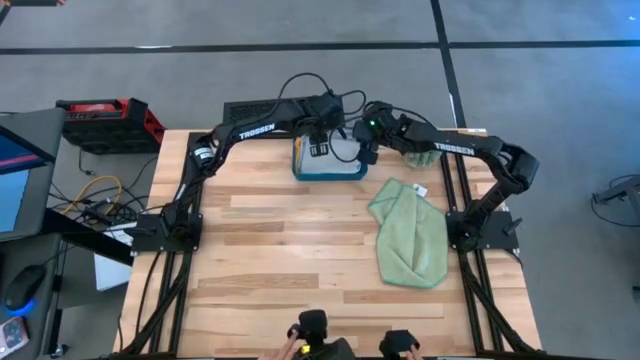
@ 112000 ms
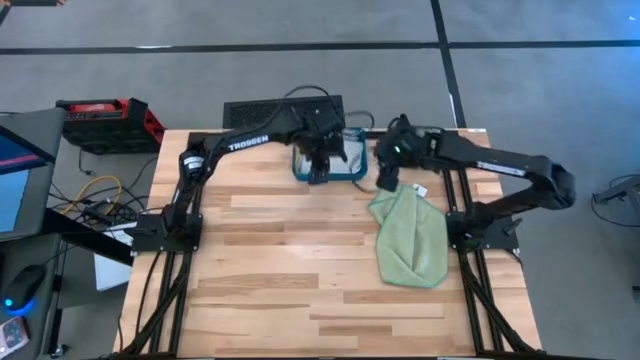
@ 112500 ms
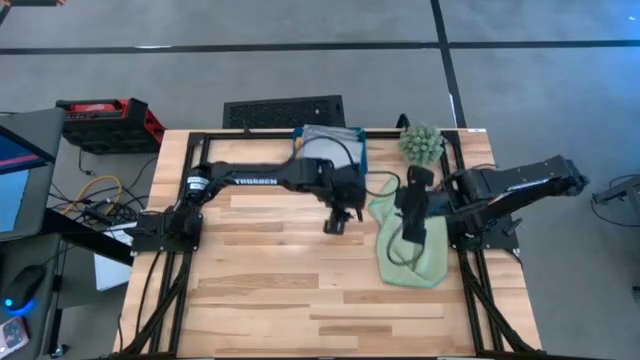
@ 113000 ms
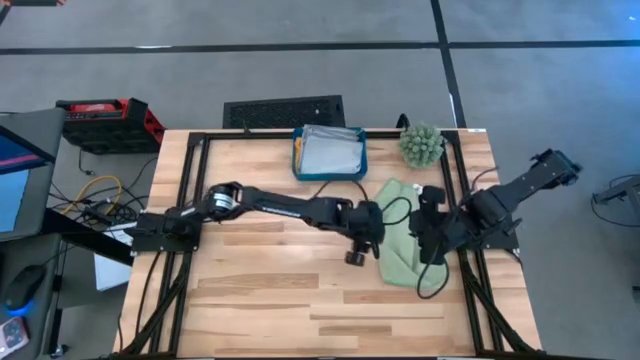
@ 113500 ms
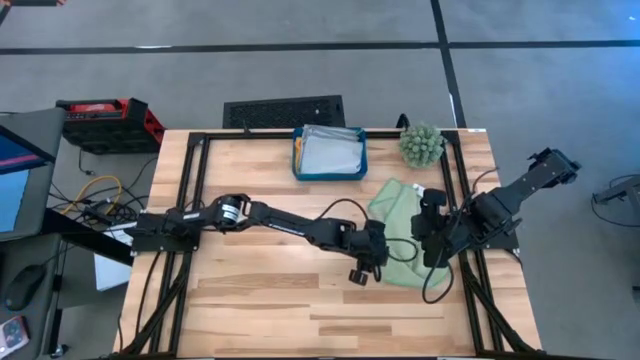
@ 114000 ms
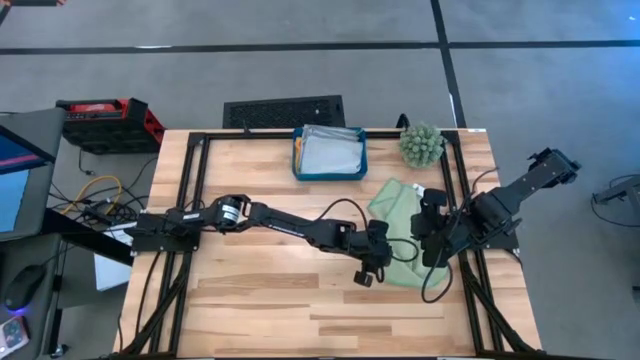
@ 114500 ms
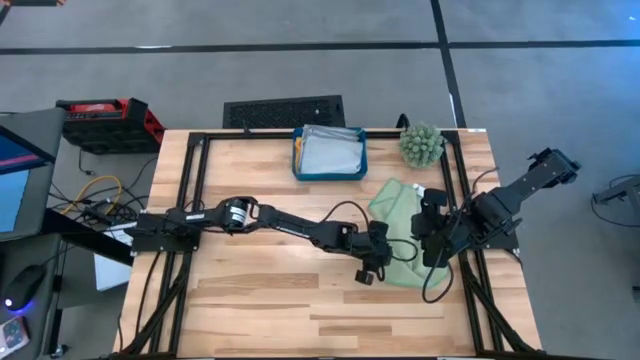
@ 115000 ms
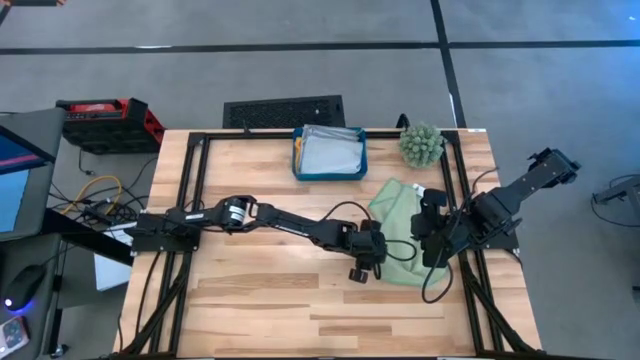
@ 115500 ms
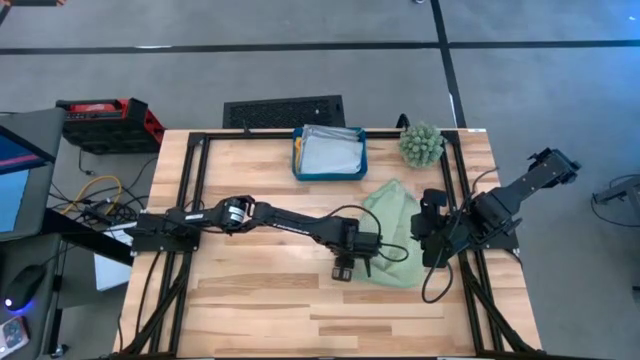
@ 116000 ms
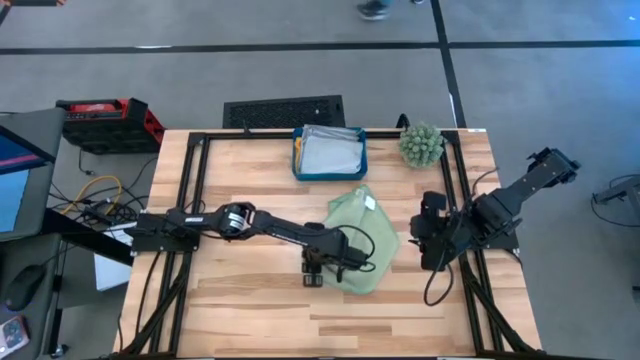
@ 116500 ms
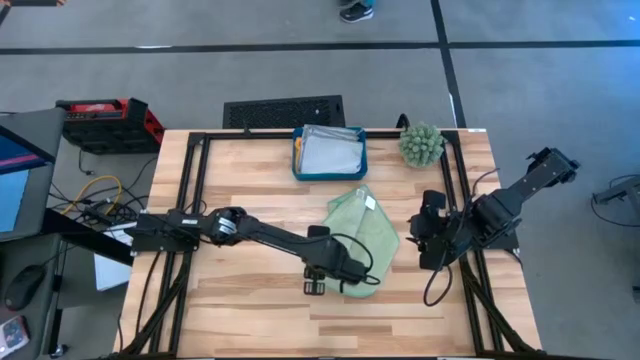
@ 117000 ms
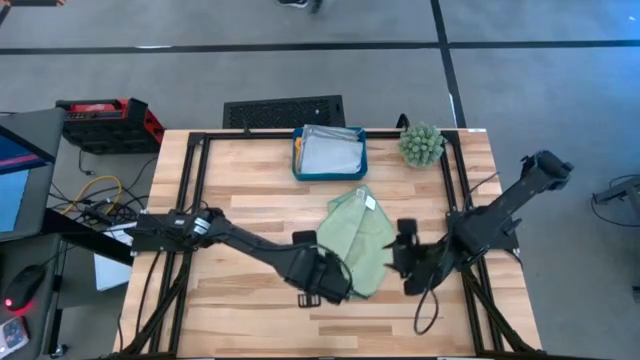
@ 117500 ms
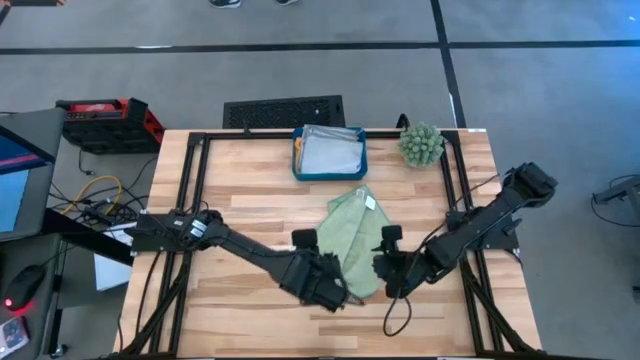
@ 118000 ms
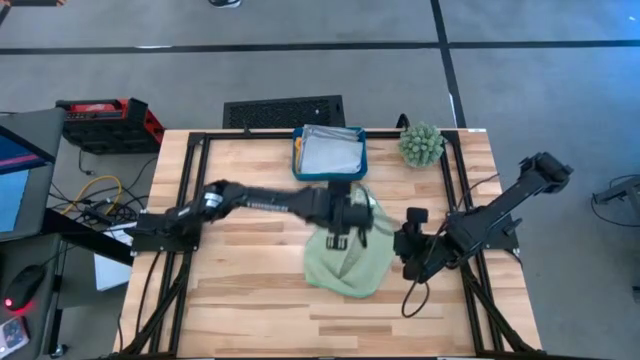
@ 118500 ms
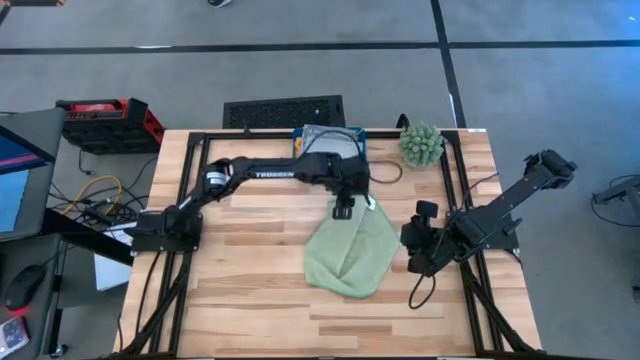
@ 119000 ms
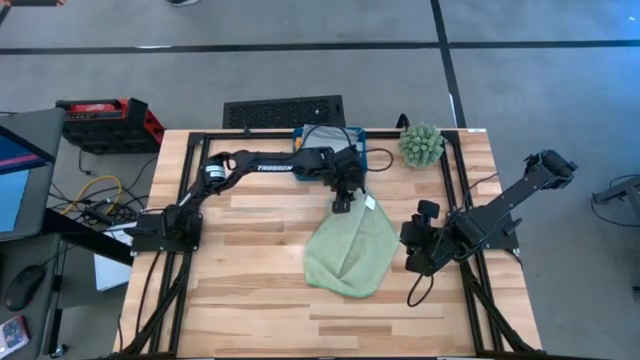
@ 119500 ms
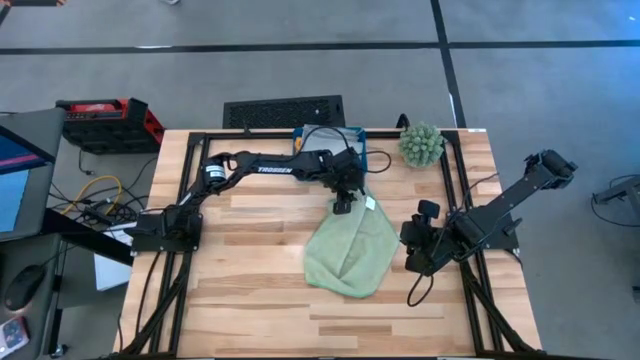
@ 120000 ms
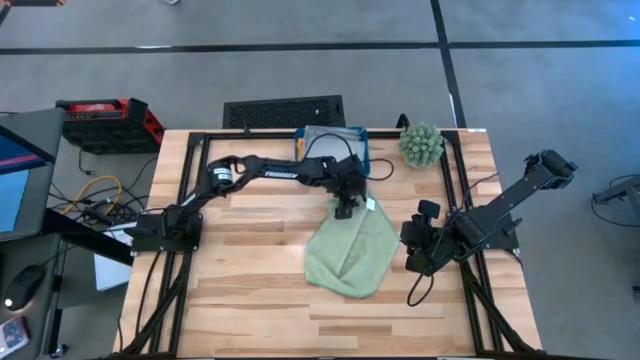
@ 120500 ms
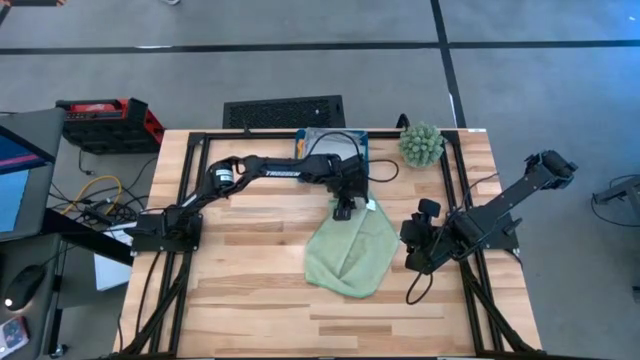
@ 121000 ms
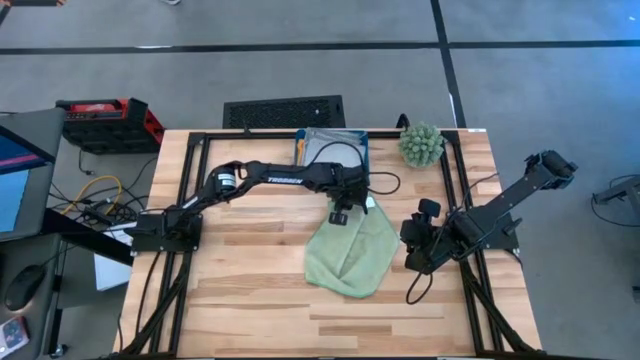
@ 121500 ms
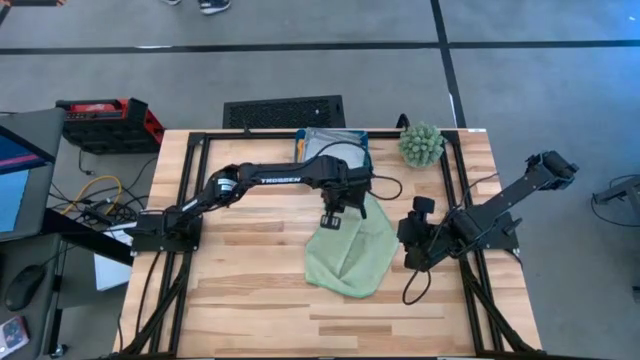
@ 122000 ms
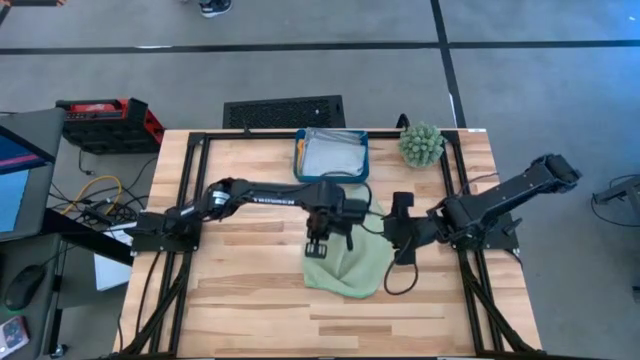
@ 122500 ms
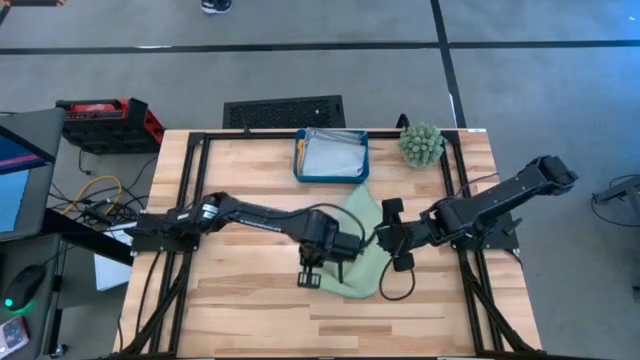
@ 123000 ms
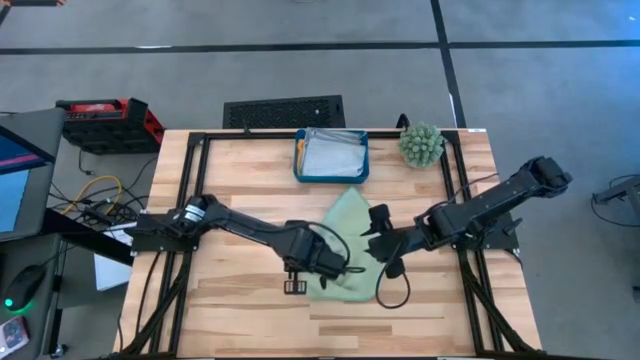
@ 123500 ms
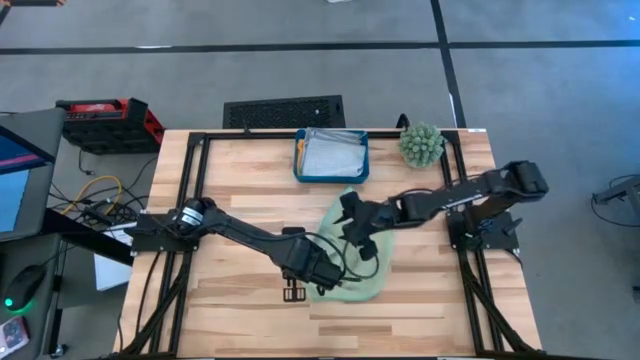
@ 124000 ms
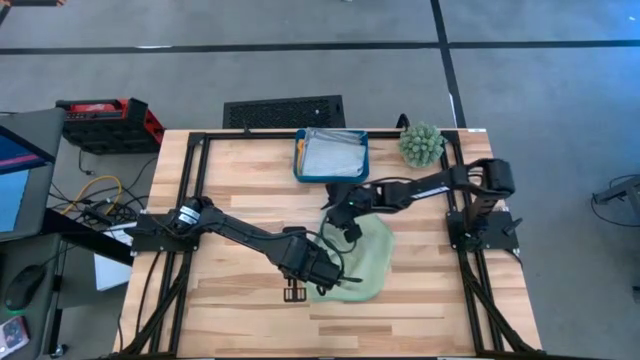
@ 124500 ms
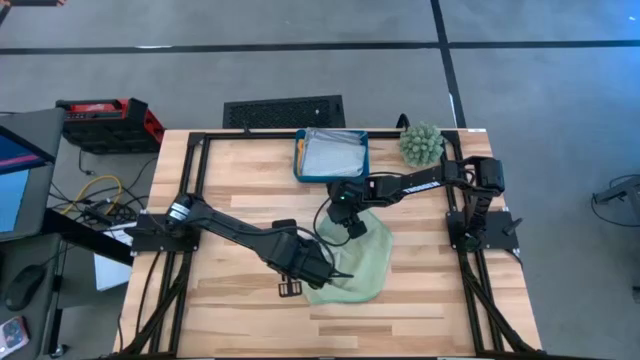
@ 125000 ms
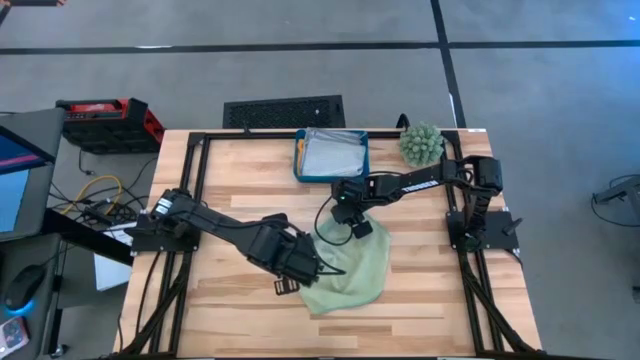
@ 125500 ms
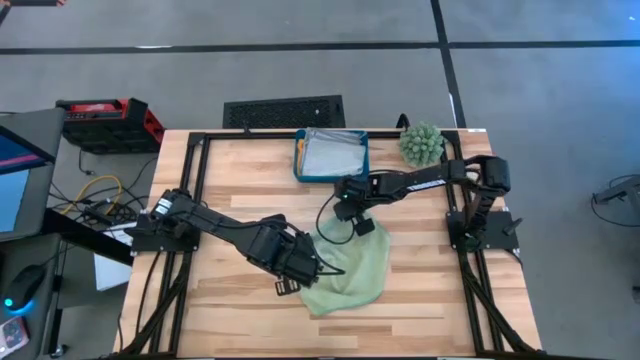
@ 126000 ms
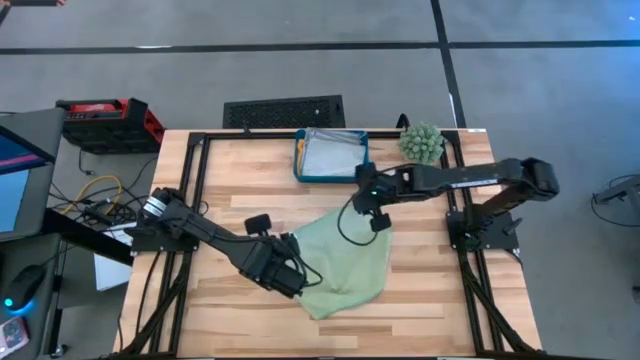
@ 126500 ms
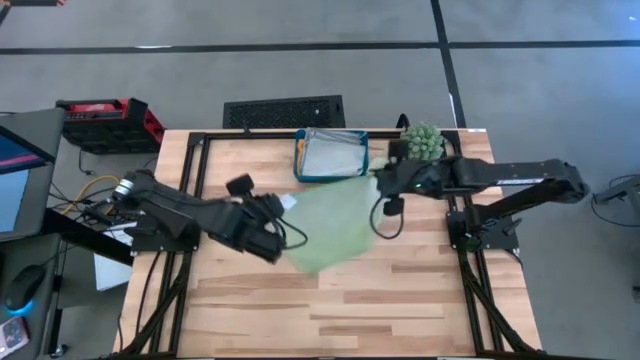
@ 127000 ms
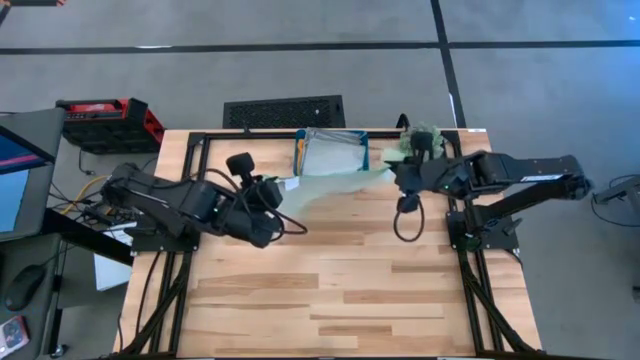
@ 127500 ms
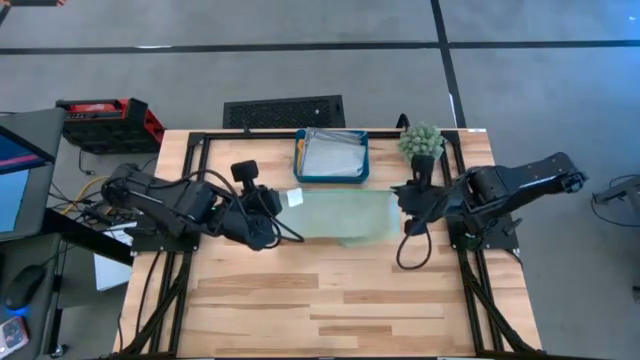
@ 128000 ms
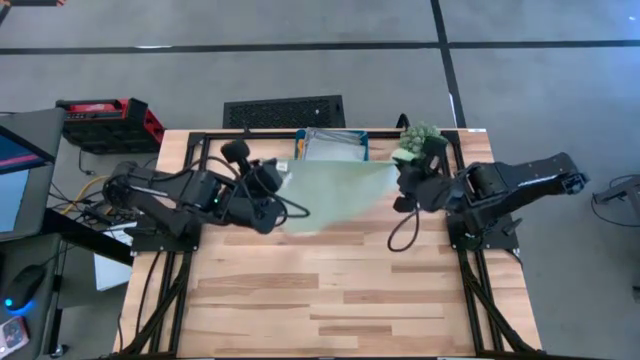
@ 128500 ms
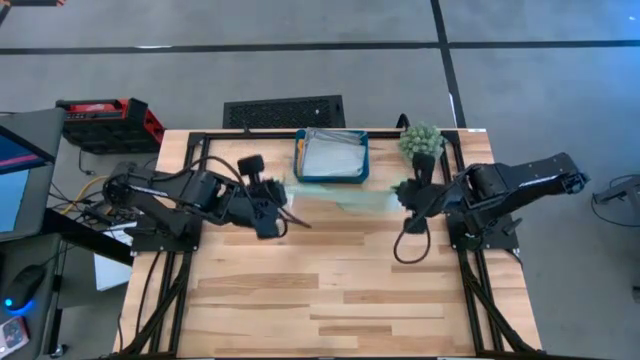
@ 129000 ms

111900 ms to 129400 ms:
Task: Fold microfiber towels
Fold the green microfiber cloth
